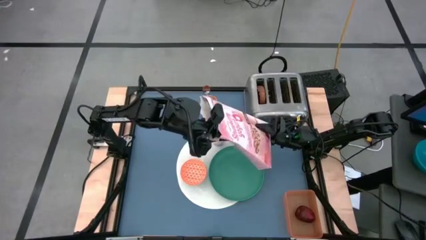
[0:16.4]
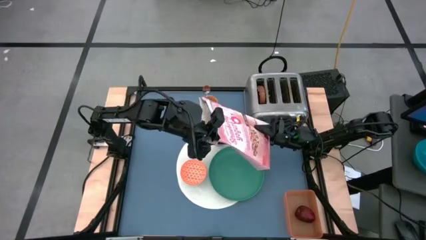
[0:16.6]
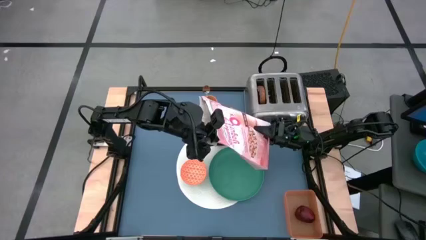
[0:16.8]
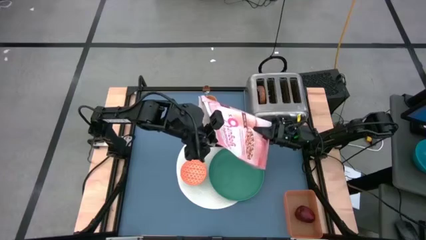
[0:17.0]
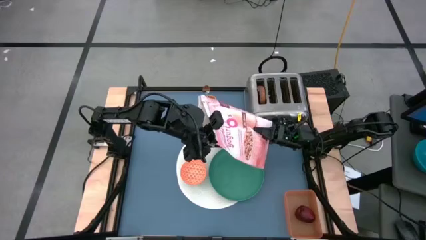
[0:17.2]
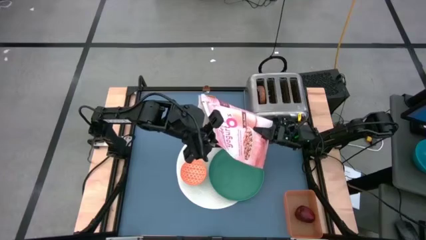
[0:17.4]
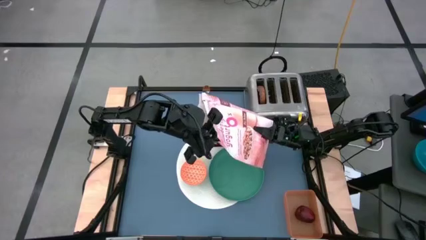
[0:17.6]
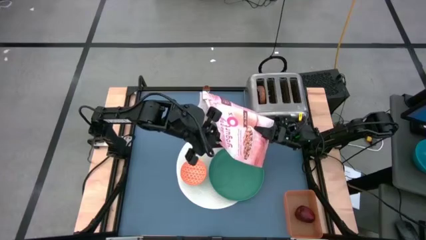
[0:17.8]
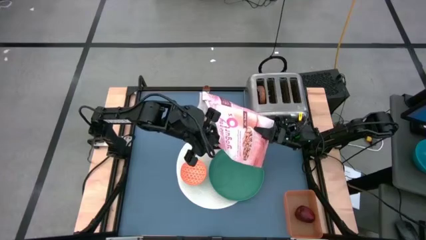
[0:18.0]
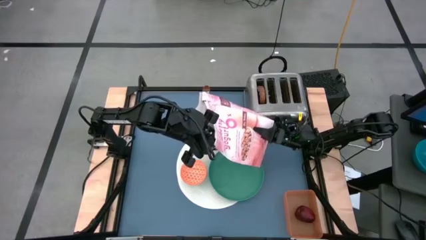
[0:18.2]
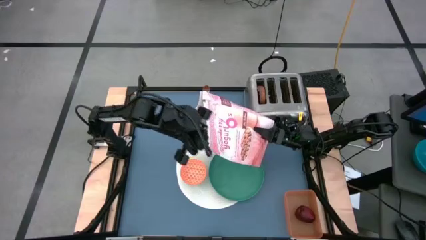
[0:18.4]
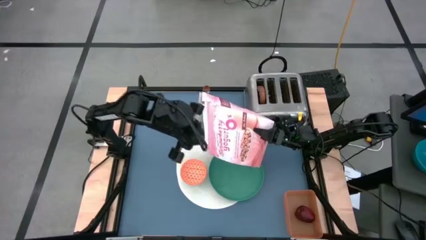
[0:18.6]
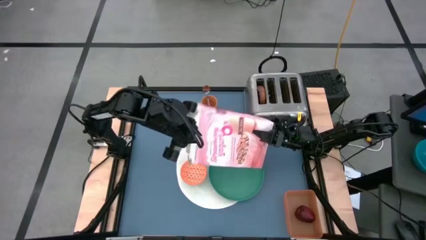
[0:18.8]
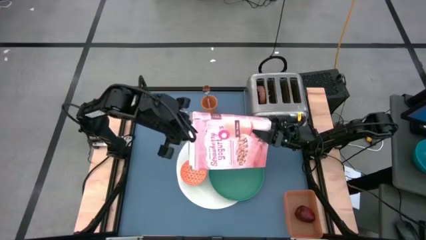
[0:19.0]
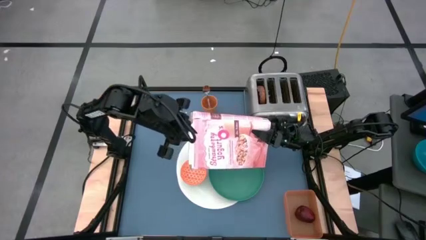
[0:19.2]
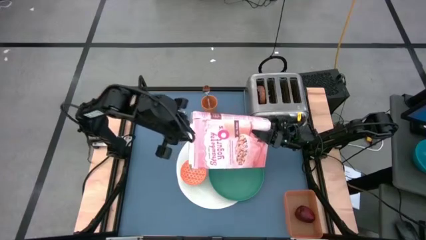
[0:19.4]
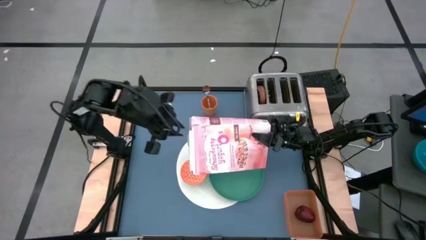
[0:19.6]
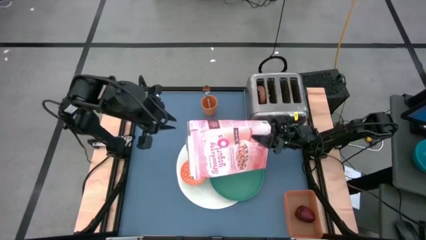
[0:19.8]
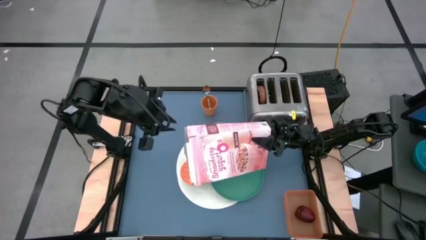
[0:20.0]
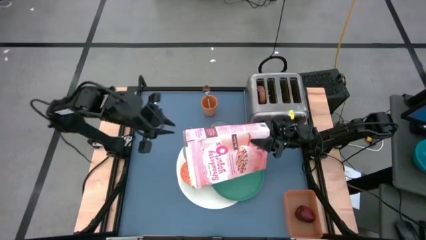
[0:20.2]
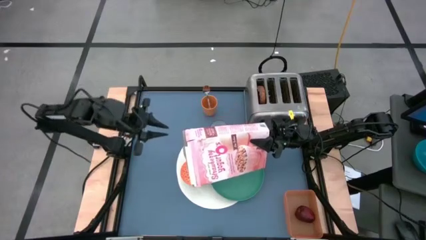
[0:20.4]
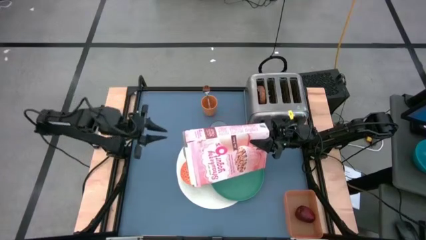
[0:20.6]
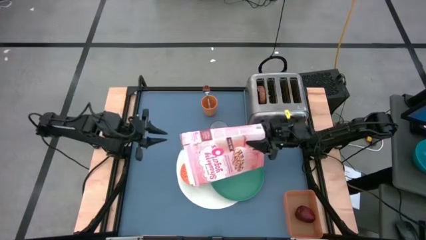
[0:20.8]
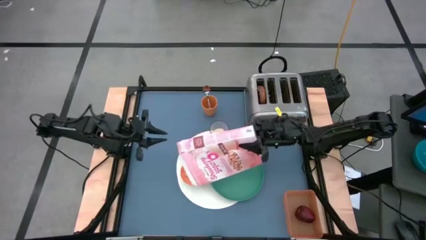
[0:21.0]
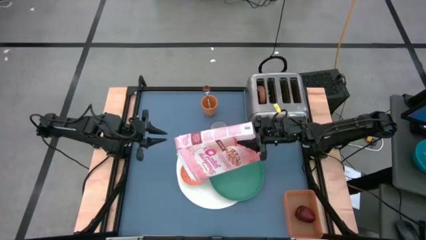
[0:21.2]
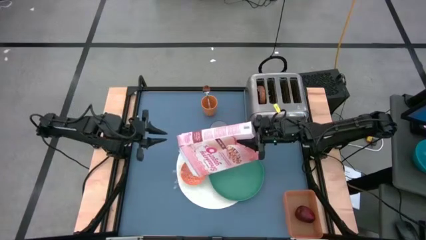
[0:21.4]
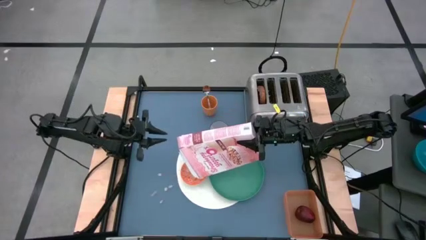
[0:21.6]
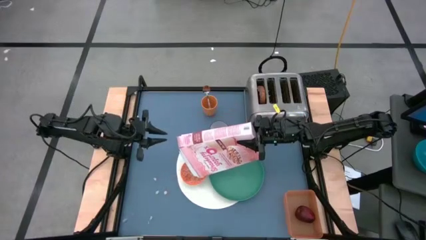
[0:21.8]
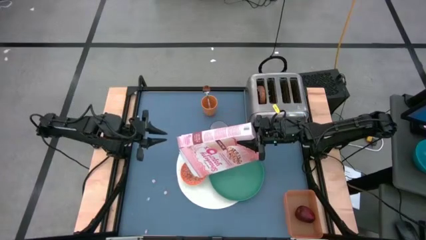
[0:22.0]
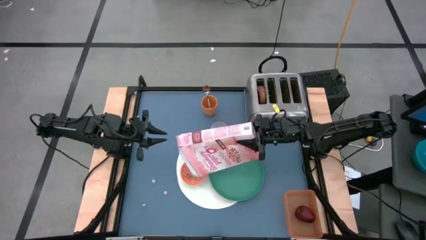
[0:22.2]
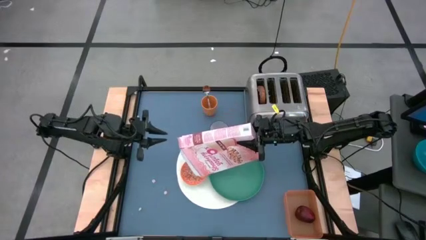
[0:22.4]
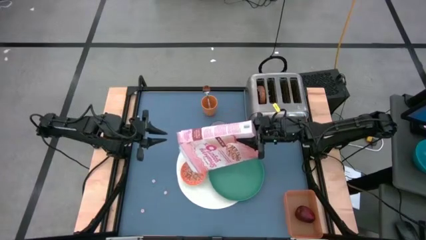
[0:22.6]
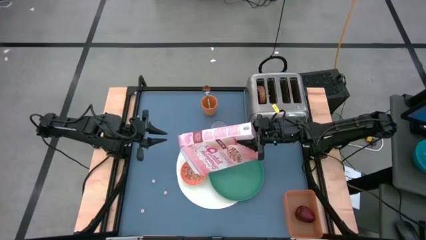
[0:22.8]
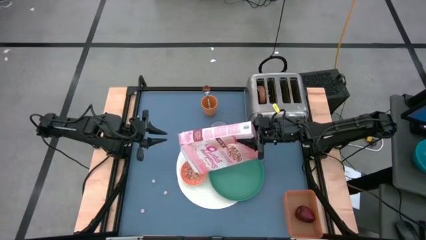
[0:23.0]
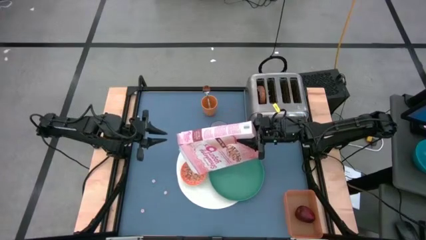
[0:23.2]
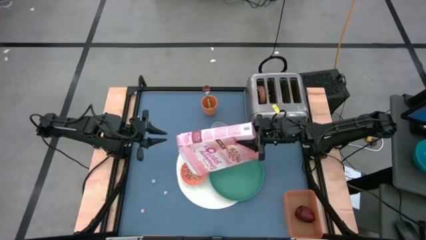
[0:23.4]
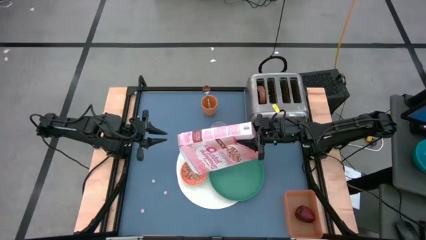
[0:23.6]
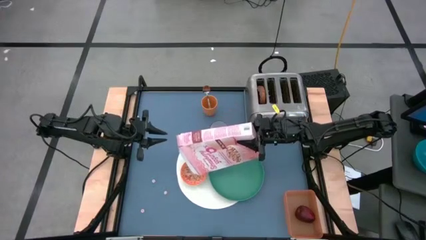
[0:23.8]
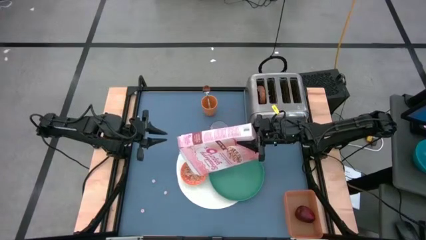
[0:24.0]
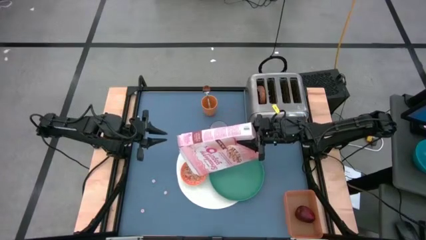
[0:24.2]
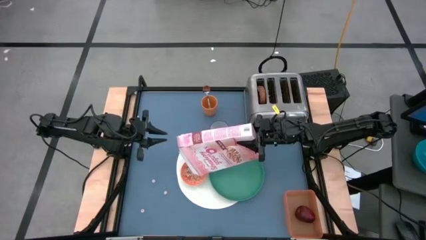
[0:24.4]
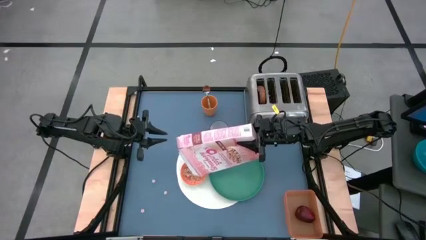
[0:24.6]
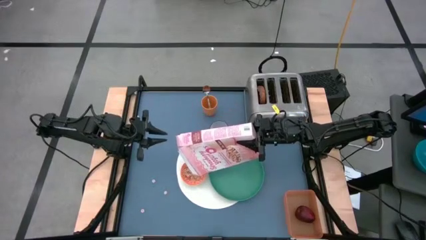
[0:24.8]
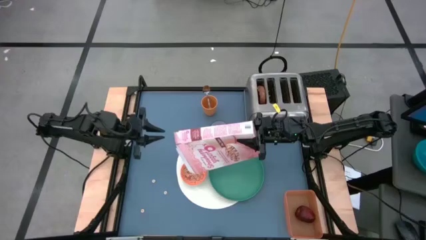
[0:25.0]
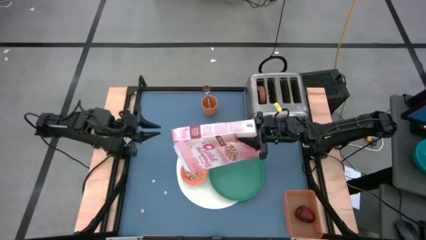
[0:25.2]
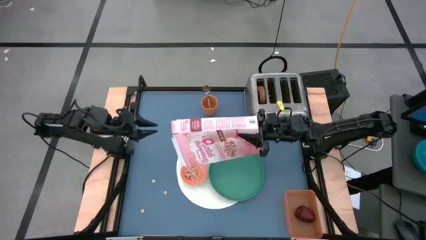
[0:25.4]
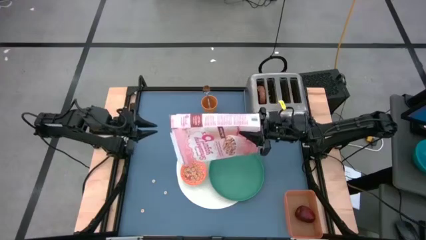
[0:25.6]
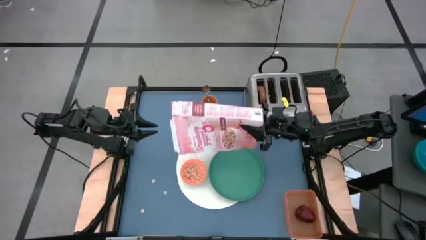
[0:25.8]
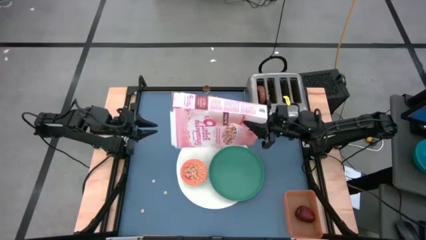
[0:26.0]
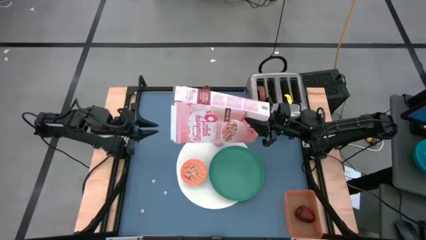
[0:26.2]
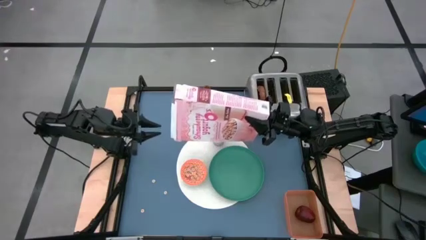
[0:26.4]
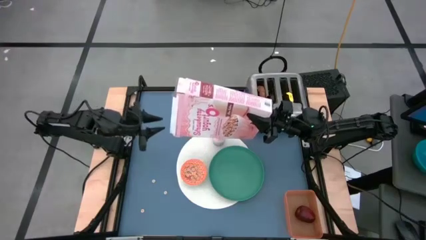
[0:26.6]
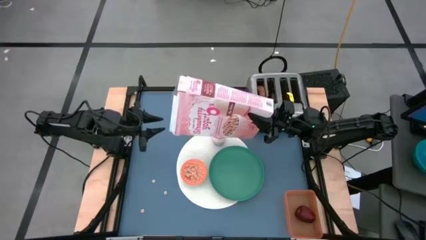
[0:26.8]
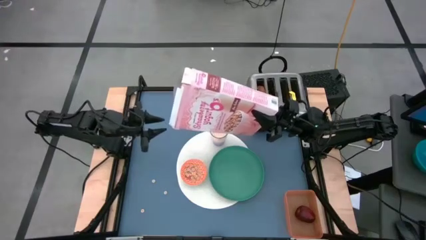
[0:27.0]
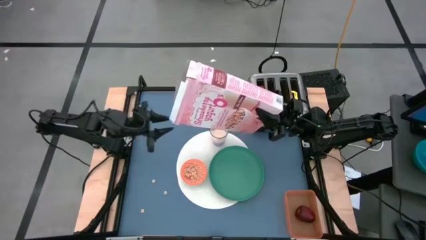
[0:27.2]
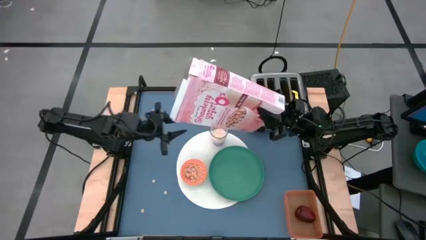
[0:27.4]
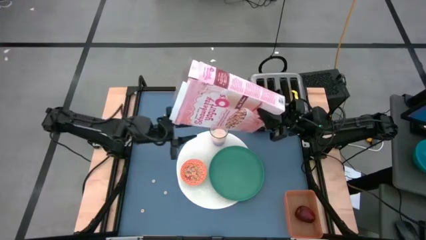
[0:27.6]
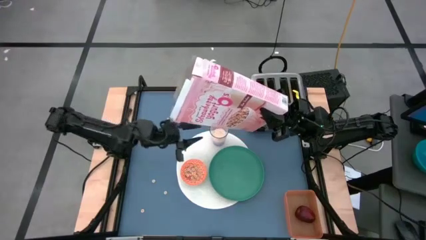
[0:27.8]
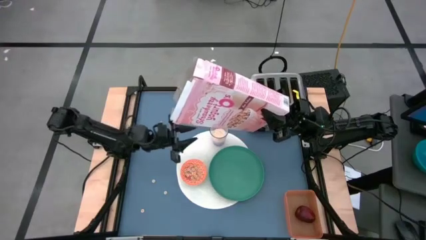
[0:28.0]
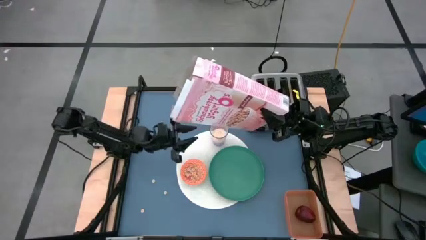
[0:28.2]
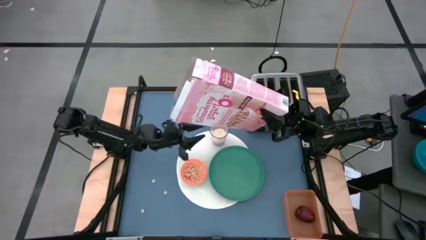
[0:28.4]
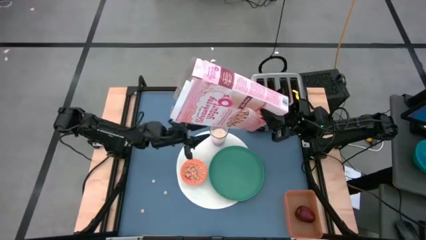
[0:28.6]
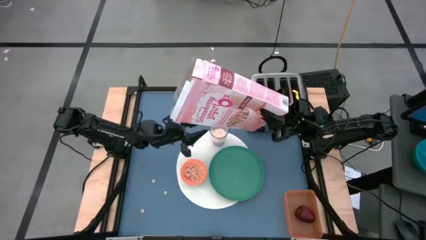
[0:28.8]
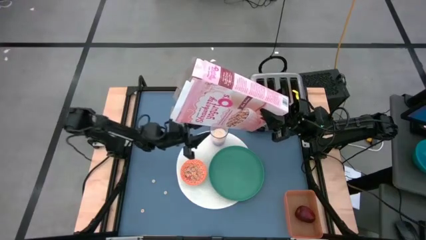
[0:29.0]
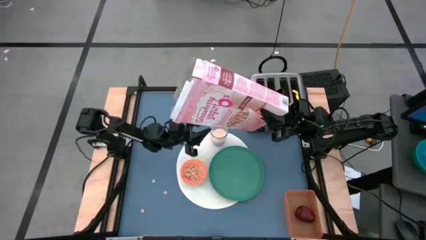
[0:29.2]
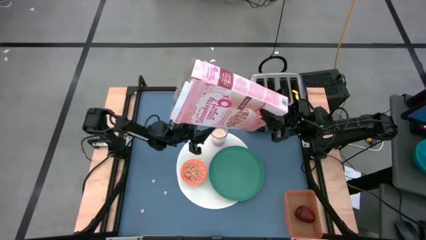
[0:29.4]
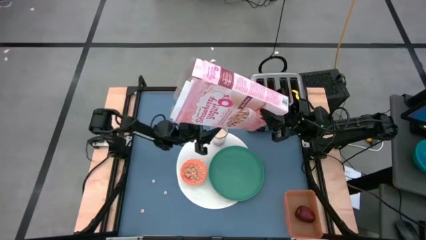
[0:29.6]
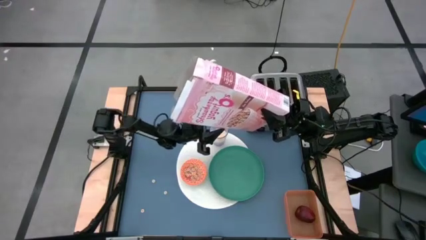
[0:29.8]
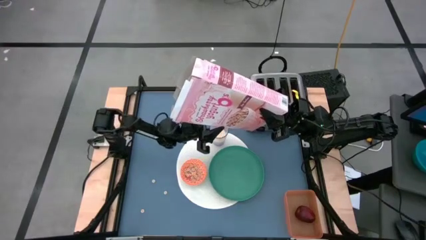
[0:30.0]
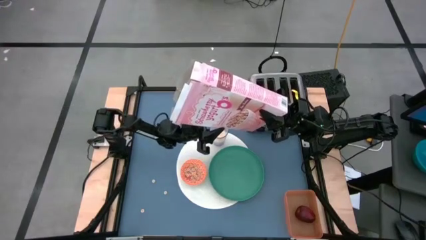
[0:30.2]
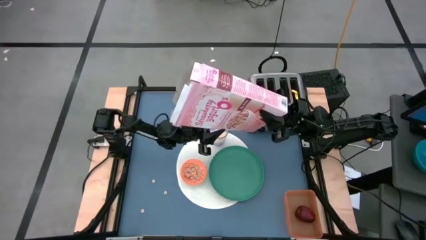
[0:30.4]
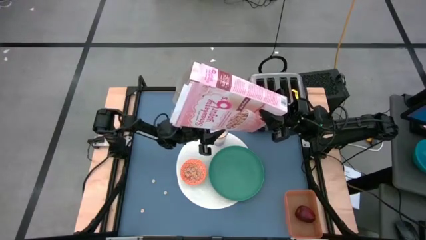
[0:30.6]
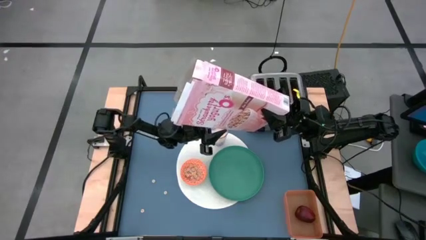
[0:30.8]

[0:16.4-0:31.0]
Task: Arrange a breakfast setting
Pour the cereal into the orange bowl
